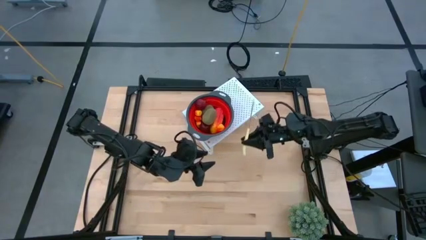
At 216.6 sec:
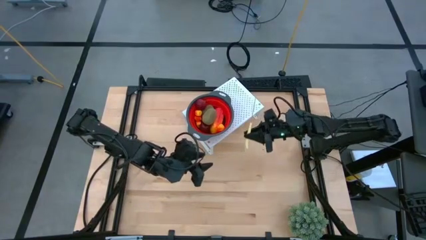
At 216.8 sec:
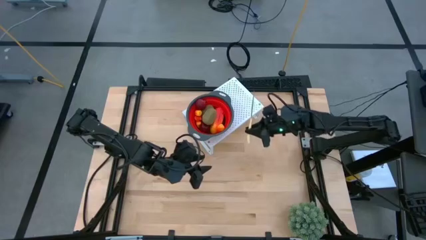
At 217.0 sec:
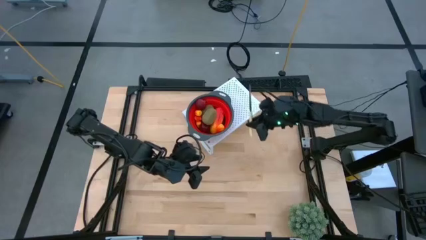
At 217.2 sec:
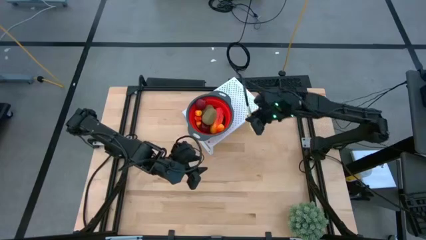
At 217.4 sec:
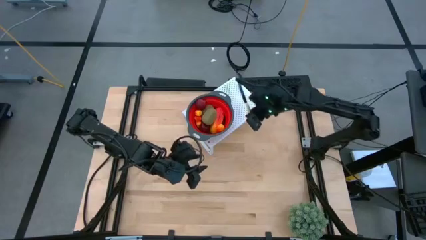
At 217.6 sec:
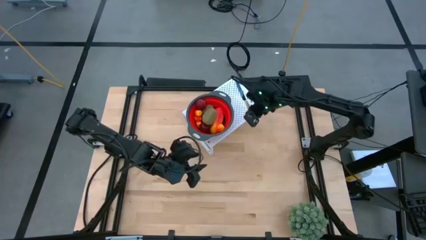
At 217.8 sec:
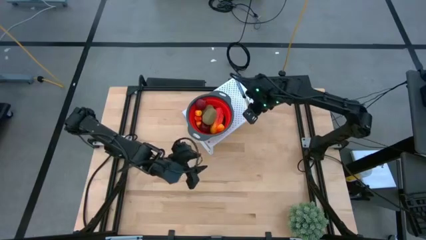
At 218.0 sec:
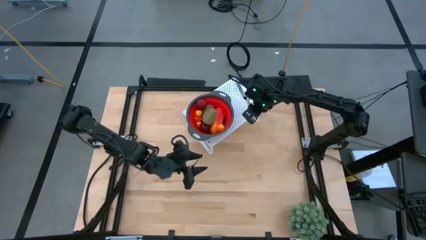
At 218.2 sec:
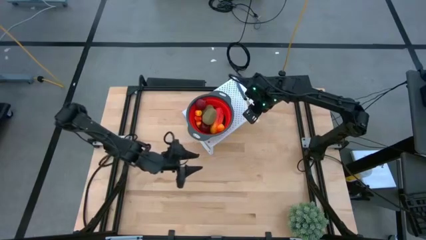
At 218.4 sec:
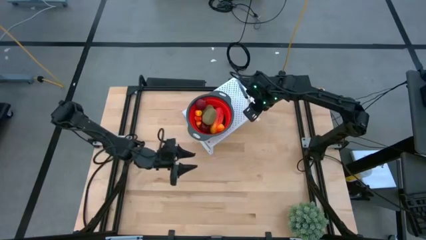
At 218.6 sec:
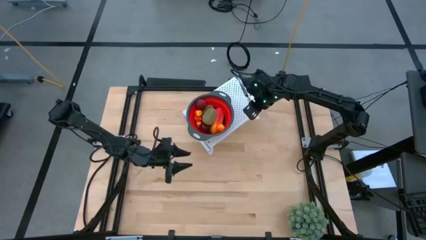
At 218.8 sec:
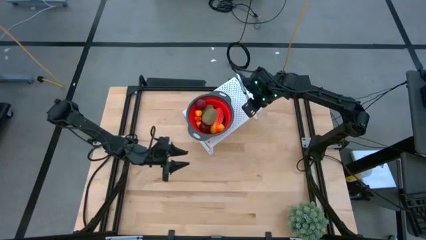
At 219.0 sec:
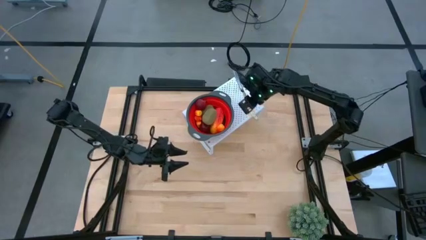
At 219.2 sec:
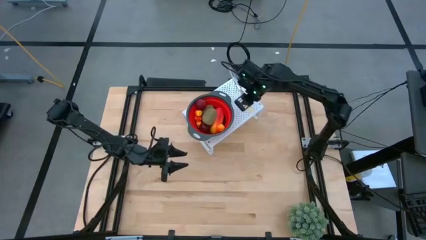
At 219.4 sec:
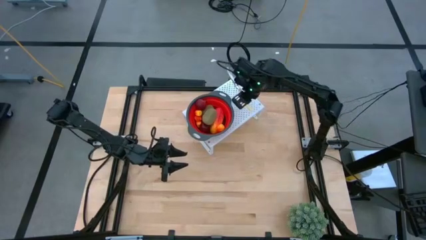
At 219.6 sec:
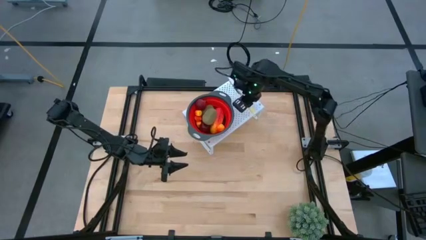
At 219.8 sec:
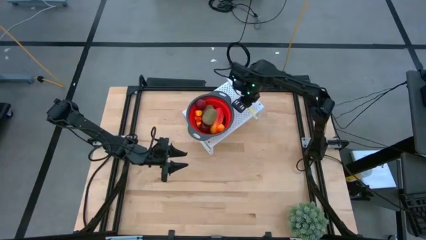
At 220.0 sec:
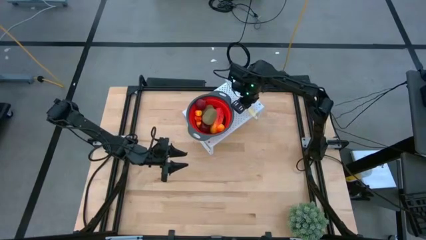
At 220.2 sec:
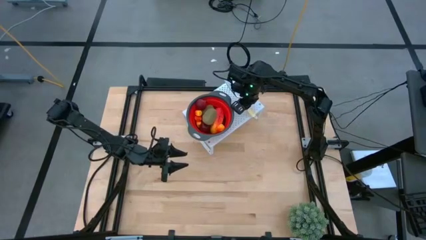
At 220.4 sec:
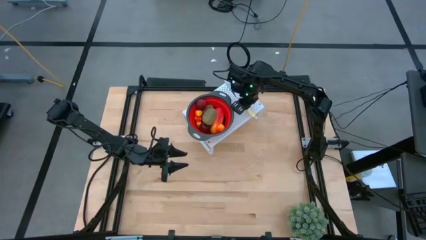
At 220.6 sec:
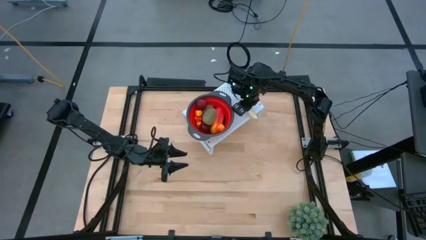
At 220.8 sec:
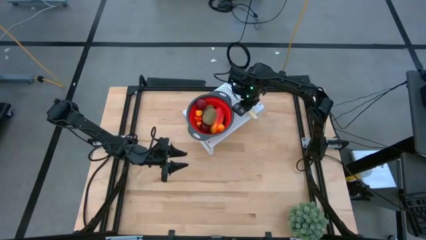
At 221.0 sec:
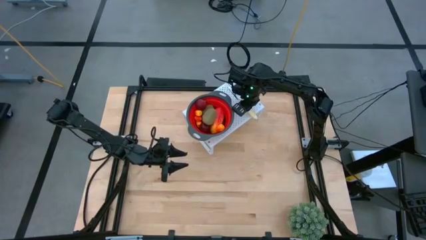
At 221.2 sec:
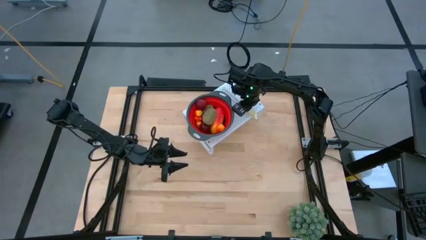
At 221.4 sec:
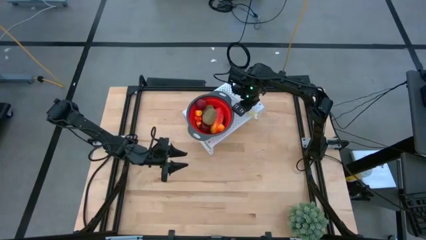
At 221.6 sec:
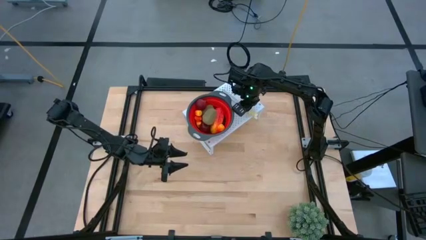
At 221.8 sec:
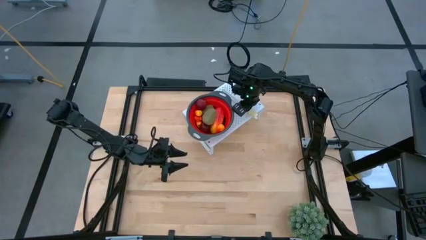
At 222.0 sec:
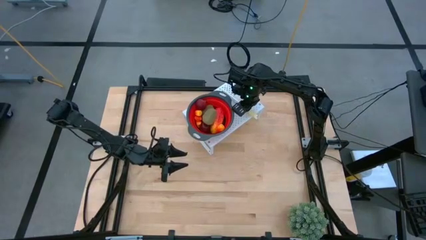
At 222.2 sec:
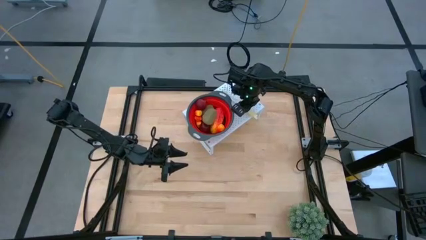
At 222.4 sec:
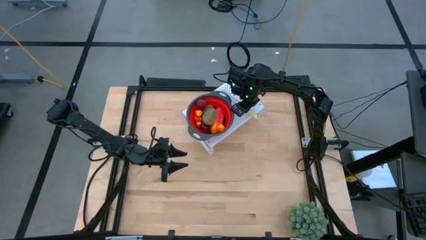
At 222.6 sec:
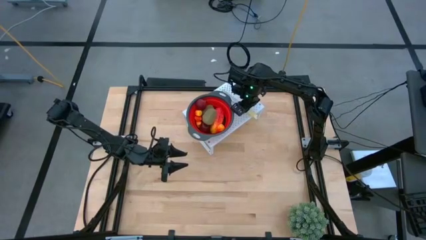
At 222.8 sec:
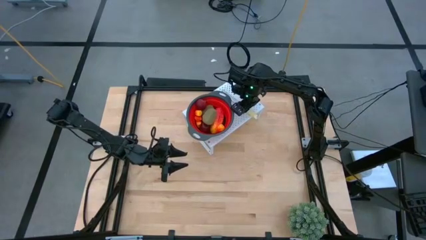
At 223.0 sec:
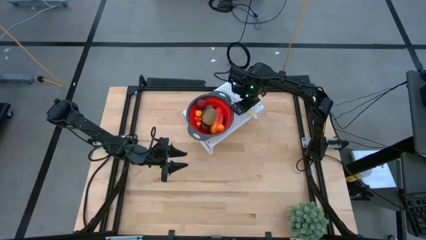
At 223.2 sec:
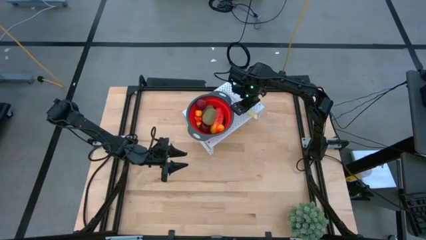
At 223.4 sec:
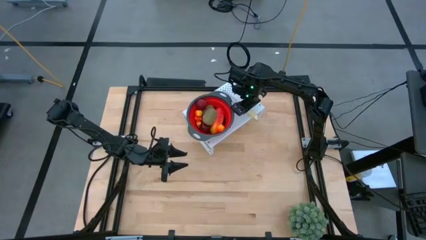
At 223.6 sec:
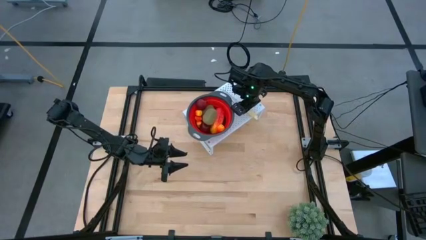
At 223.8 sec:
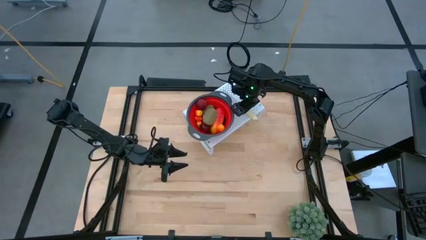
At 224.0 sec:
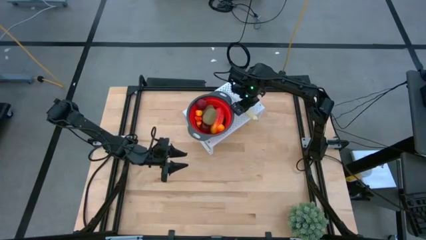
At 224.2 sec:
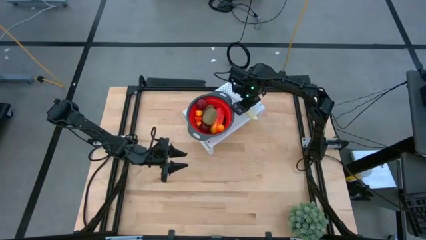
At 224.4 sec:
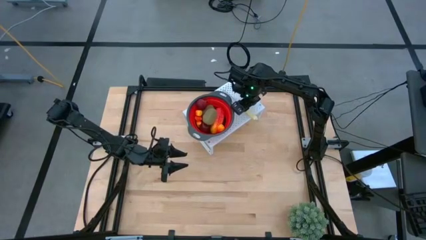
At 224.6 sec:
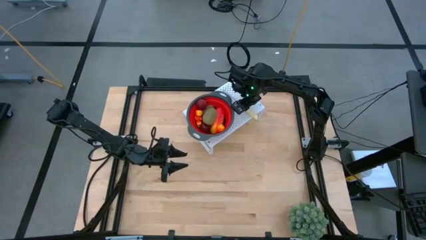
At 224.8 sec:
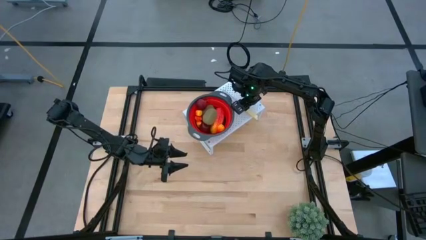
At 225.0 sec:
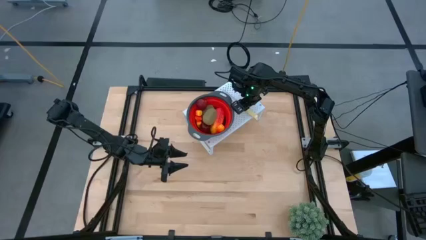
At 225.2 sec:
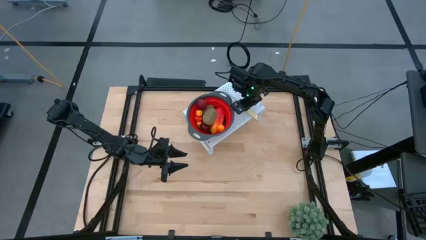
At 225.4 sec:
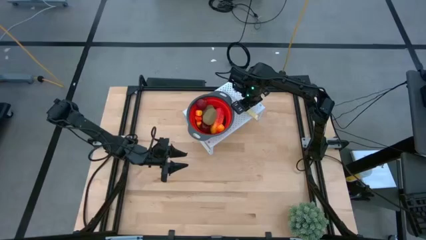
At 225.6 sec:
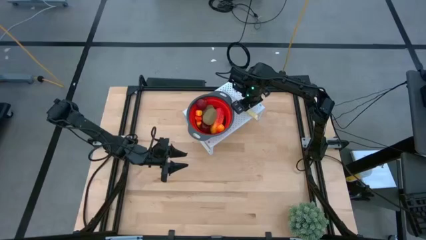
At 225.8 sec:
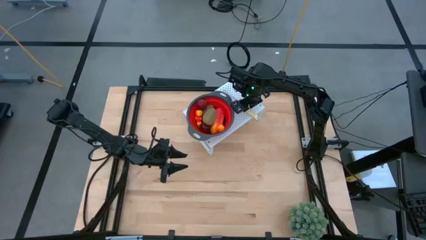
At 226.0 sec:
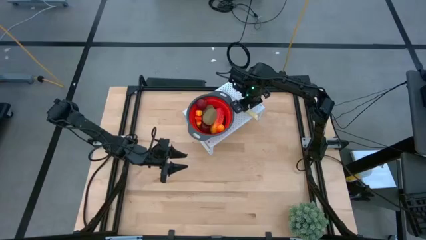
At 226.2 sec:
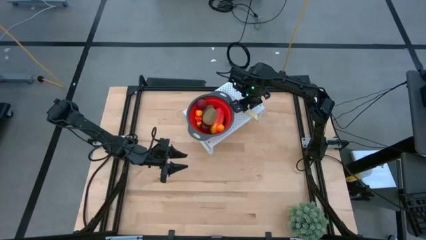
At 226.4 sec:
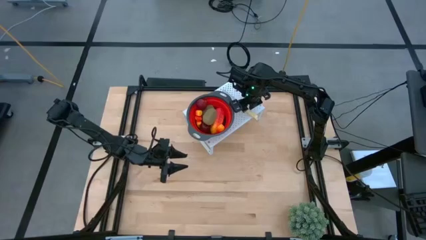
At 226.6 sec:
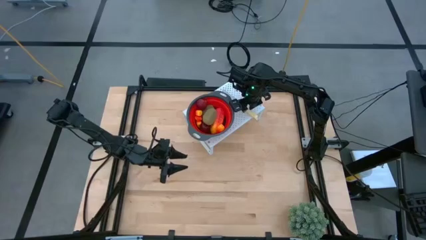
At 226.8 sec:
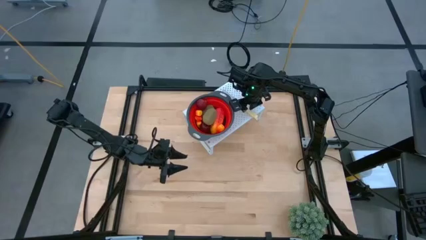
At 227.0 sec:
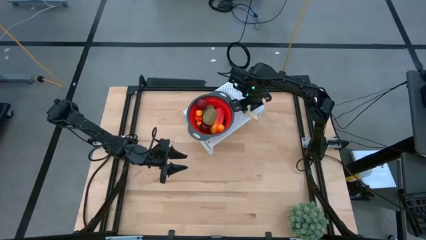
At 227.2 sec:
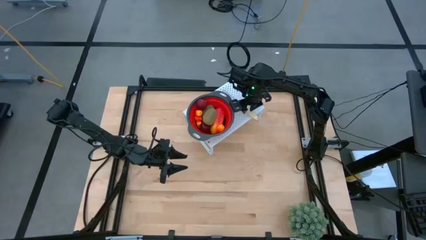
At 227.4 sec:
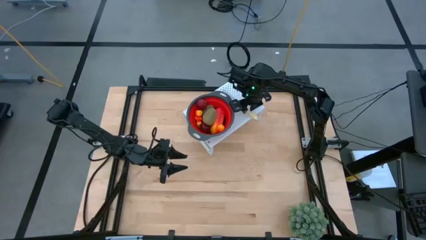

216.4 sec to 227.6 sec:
Task: Pick & Place Fruit
Put the yellow table knife on the shelf

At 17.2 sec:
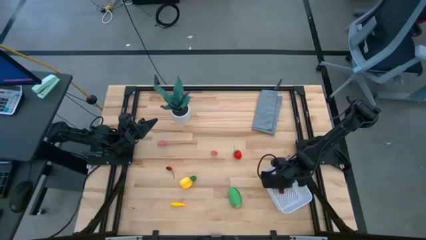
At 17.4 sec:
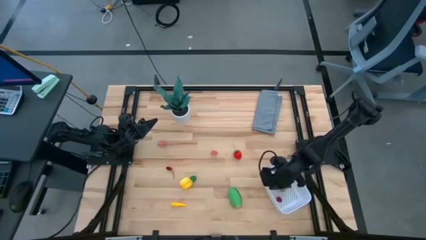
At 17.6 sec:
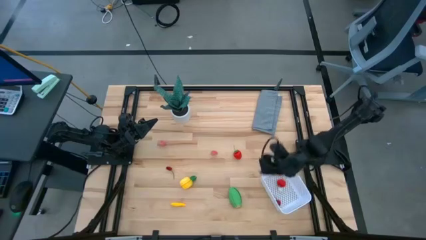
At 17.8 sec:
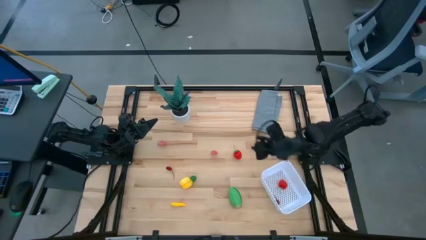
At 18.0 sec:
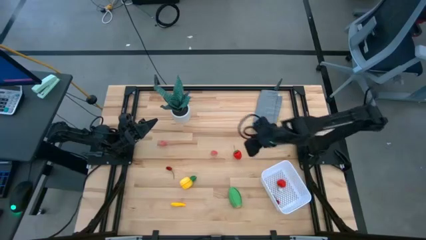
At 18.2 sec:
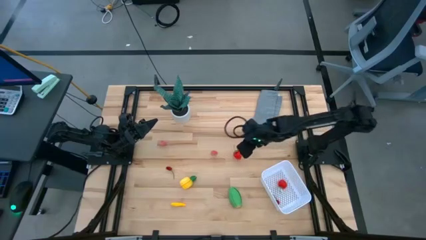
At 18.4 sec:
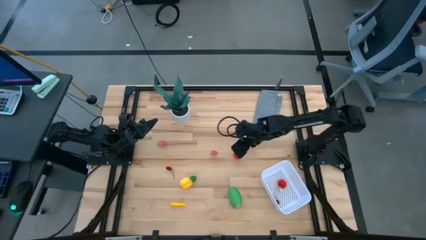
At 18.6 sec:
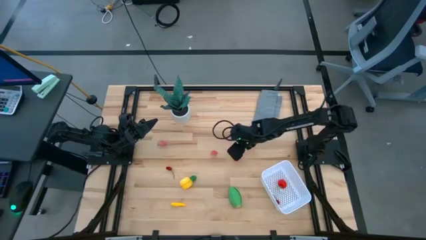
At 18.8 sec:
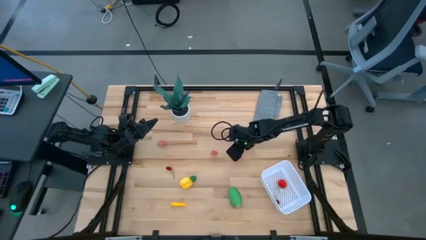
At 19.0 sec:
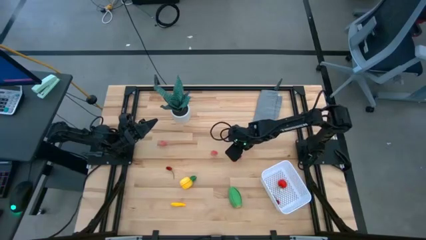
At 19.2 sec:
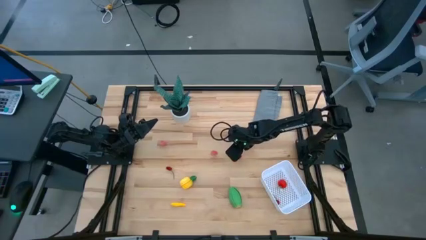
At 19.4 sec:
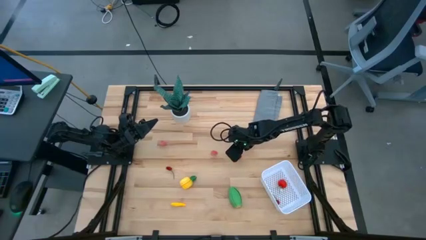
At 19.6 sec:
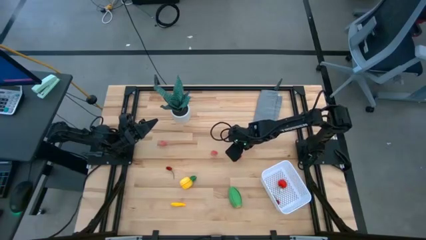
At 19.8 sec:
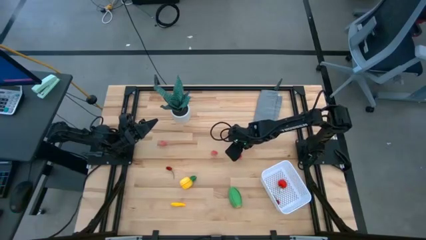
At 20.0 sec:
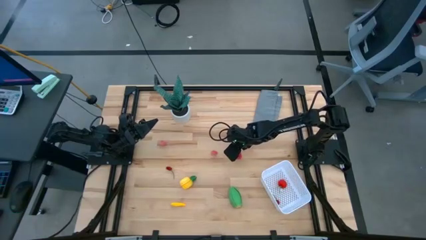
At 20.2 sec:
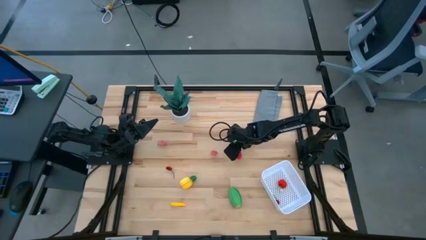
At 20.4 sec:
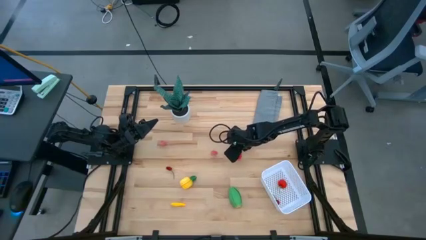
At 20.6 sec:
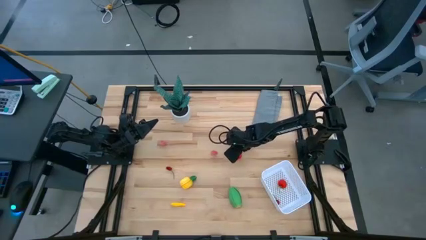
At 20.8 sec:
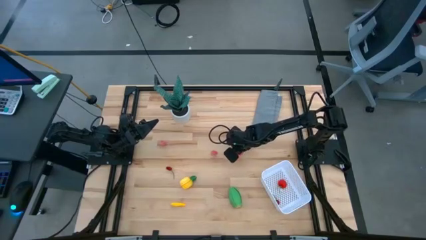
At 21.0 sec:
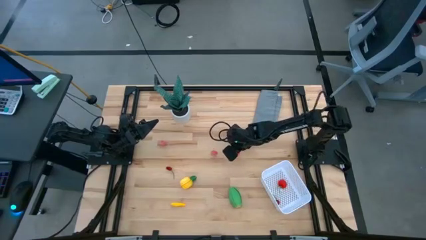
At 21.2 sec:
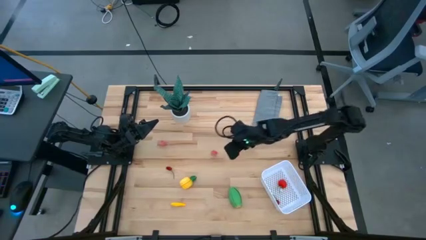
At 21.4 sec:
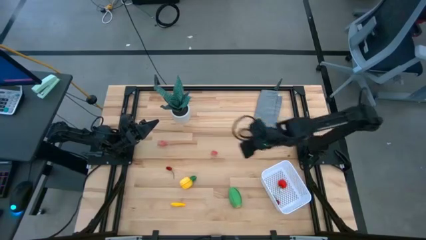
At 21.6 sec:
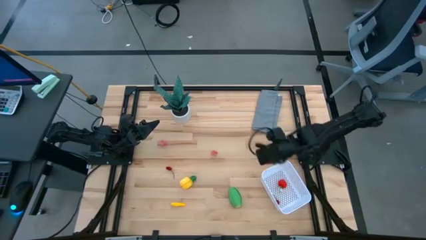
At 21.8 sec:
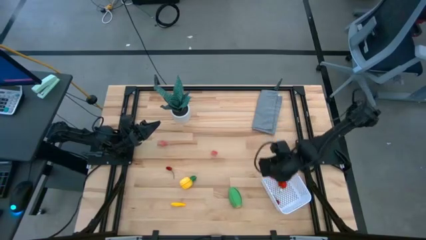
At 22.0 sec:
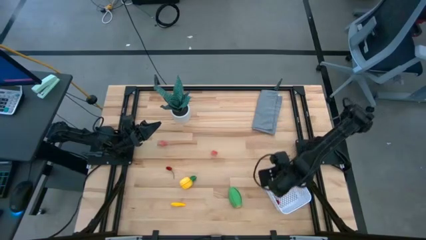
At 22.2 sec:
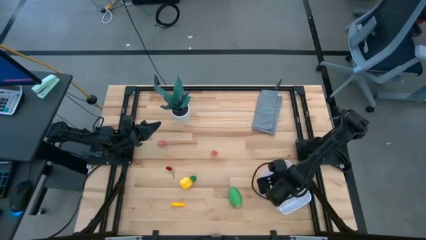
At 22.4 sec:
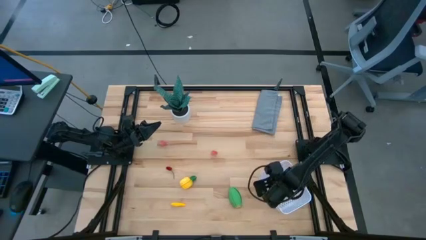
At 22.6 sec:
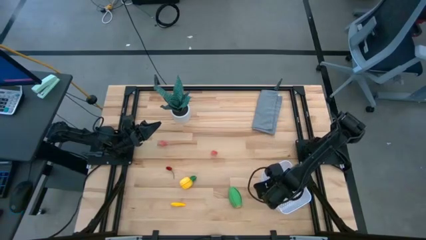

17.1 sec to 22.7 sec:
Task: Pick and placing Produce into tupperware
Put the red strawberry into the white basket
